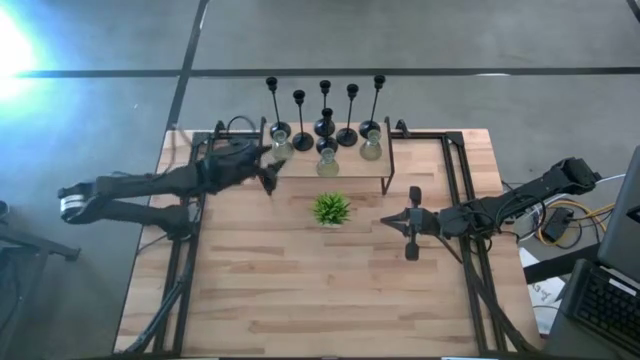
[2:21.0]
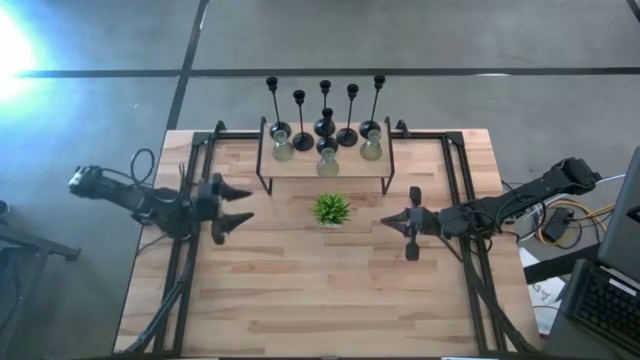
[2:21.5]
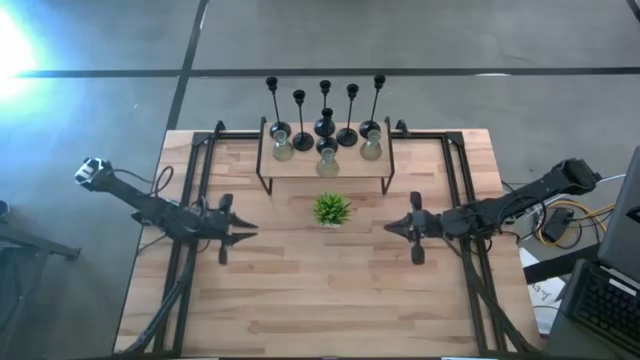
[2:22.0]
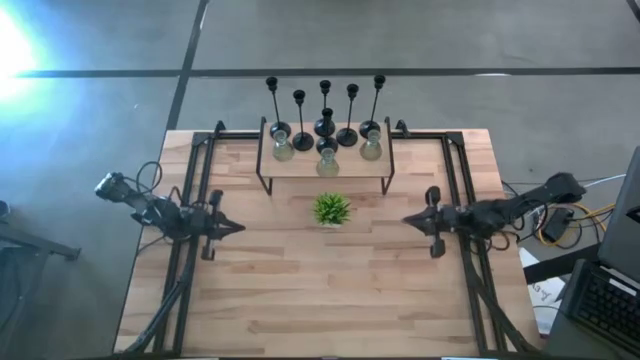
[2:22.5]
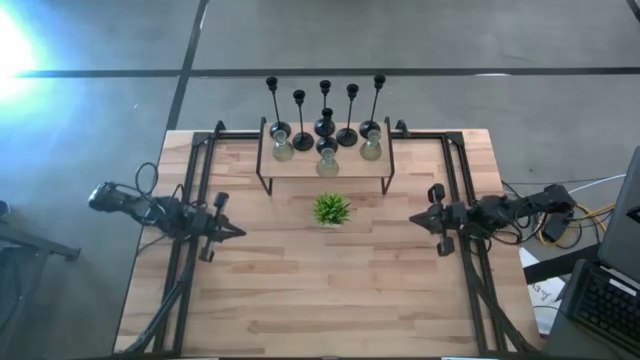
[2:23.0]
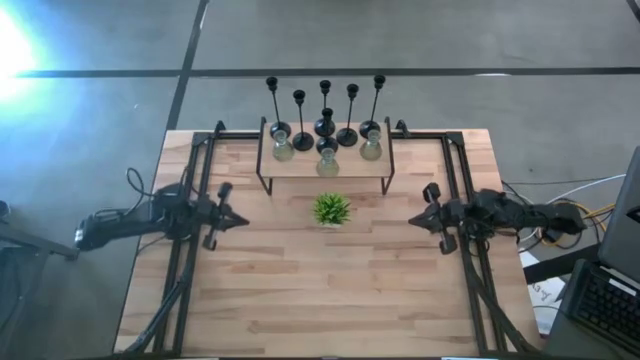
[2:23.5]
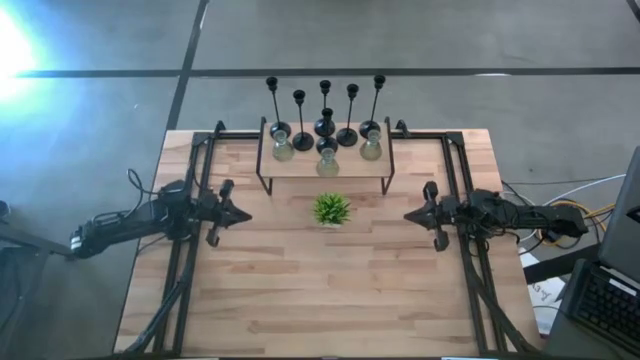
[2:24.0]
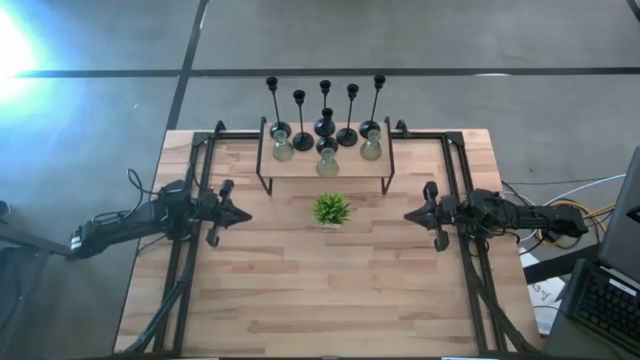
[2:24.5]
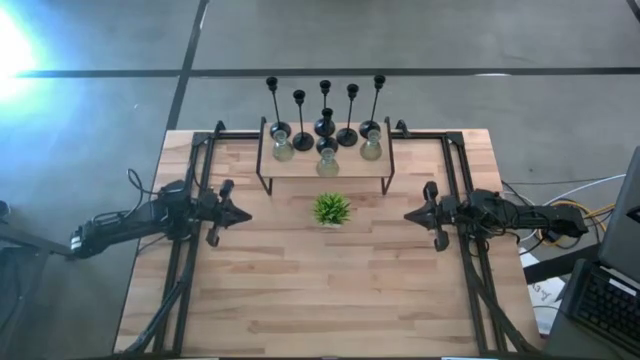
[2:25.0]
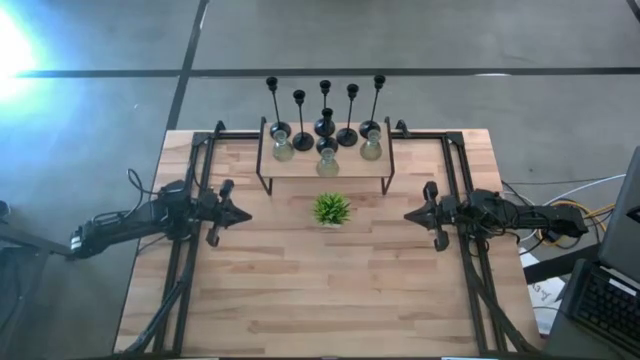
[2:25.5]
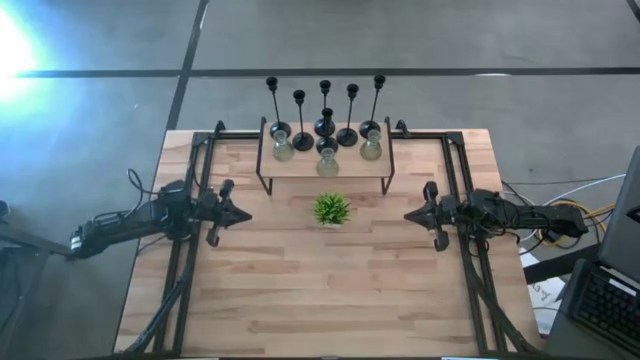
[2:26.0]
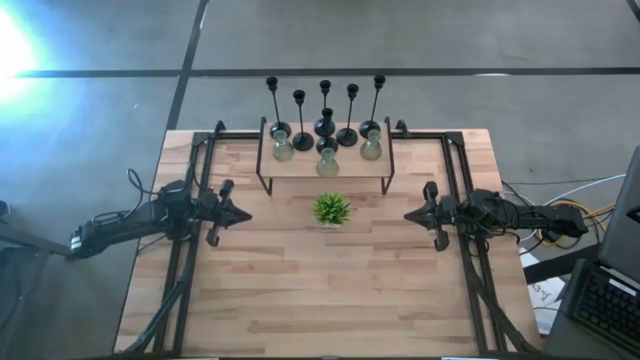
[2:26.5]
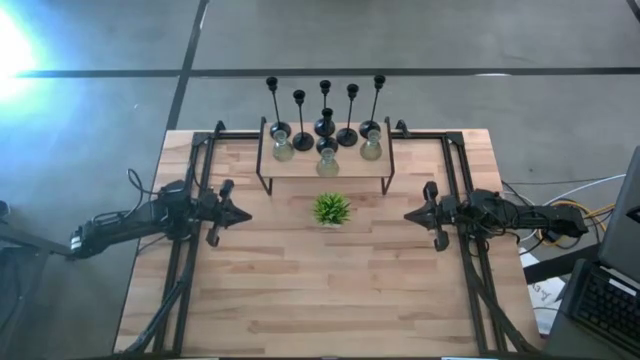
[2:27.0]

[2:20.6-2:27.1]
Task: Pick & Place candle stick holders
Return to Home Position

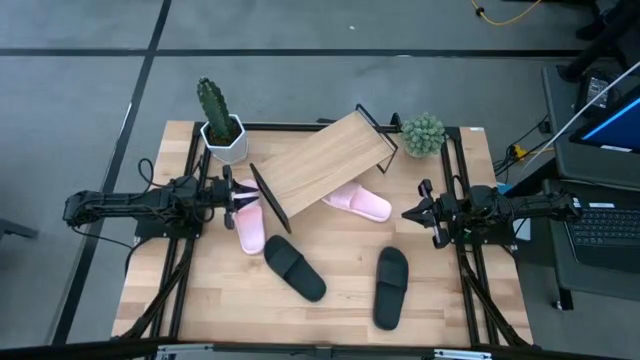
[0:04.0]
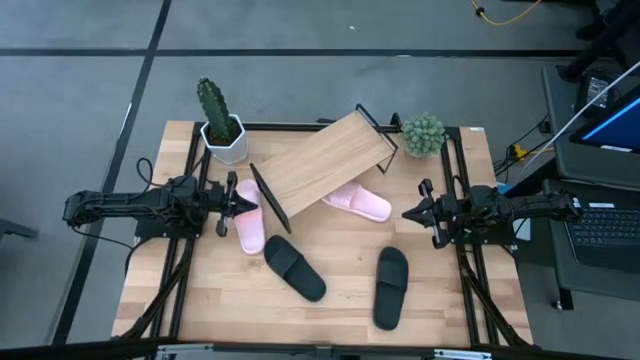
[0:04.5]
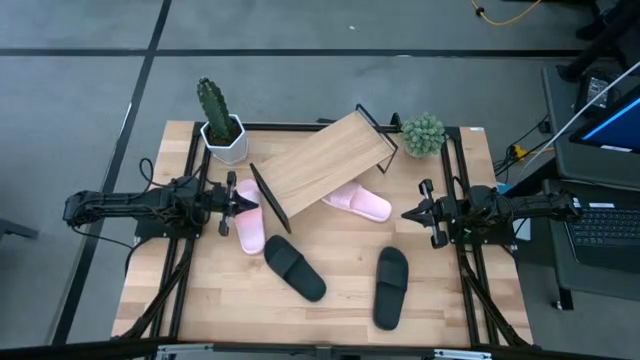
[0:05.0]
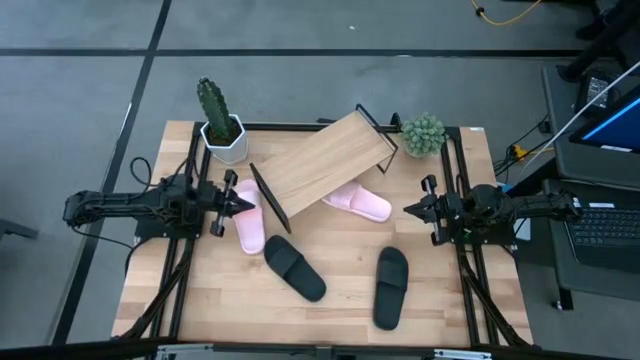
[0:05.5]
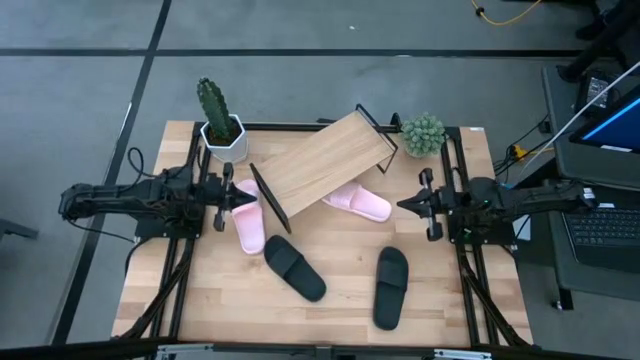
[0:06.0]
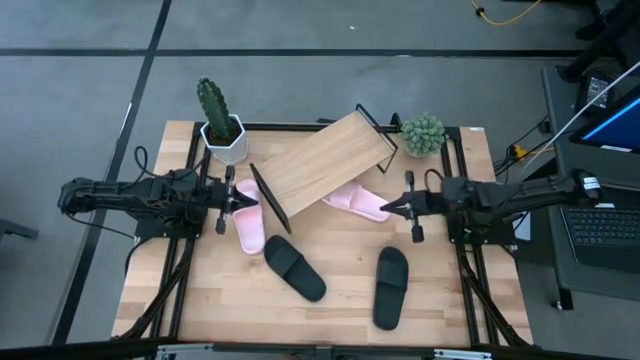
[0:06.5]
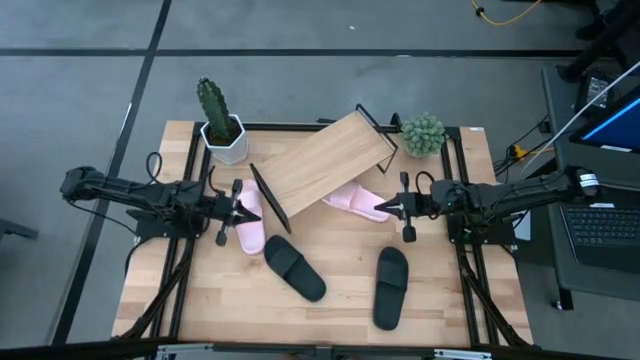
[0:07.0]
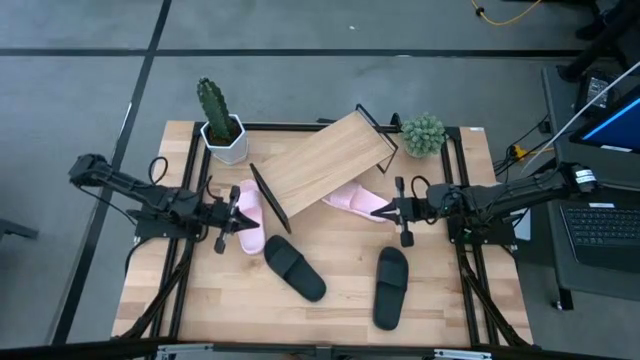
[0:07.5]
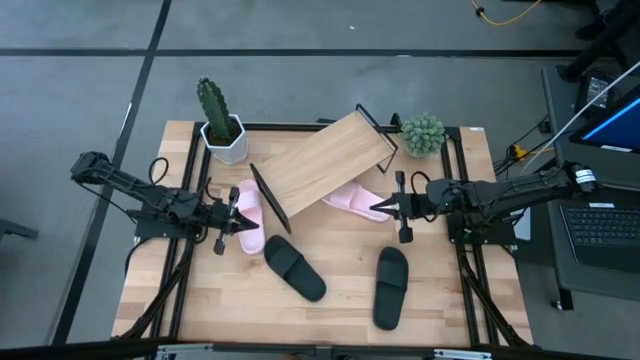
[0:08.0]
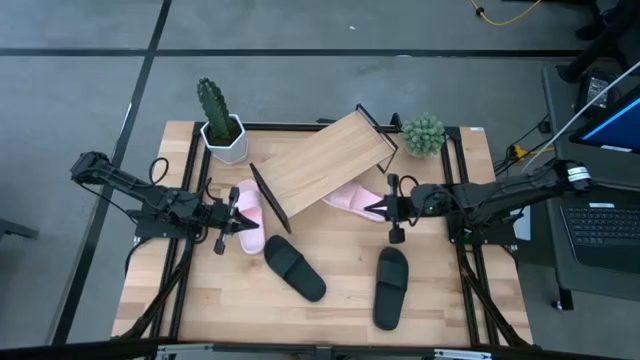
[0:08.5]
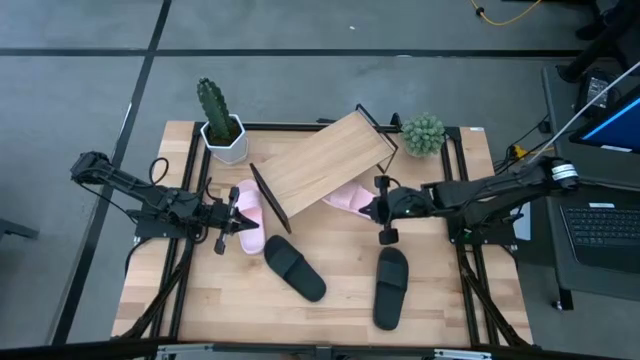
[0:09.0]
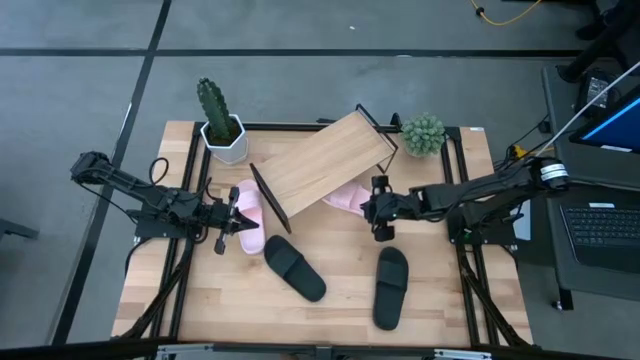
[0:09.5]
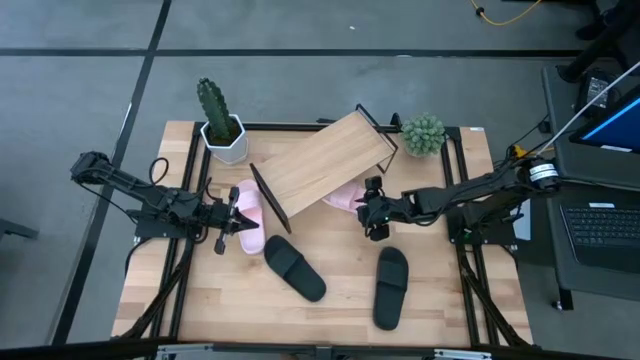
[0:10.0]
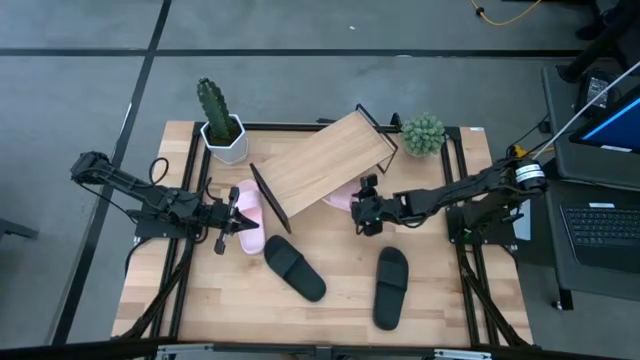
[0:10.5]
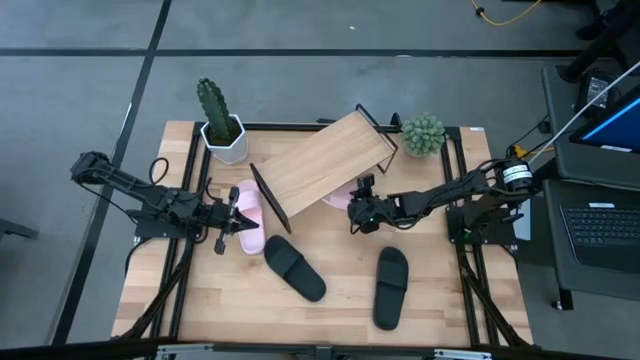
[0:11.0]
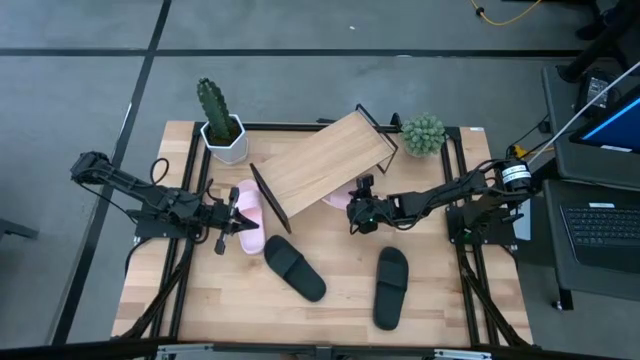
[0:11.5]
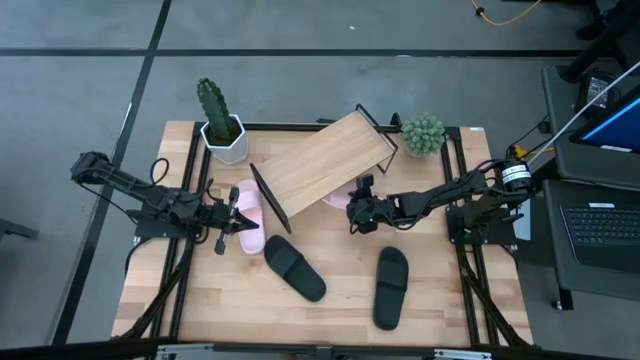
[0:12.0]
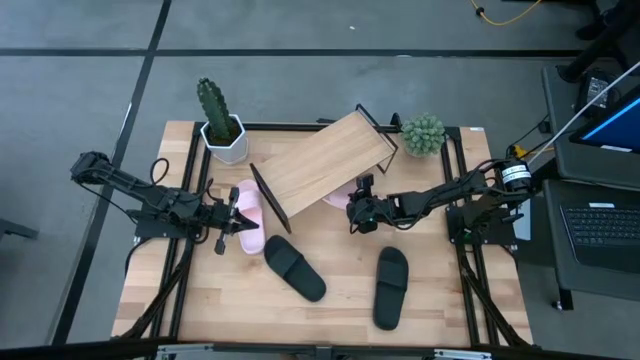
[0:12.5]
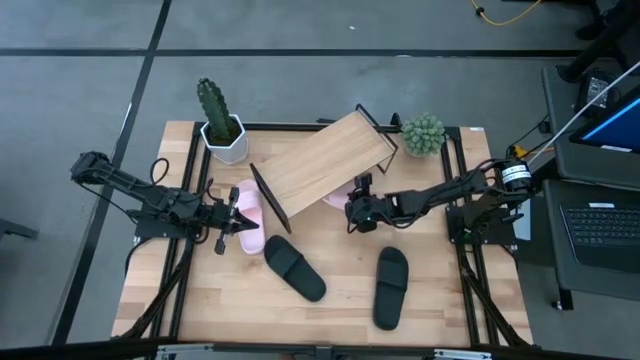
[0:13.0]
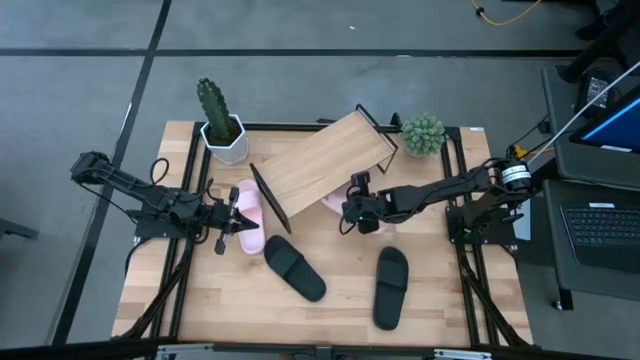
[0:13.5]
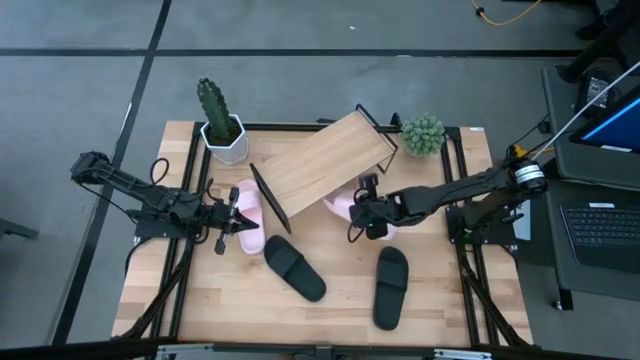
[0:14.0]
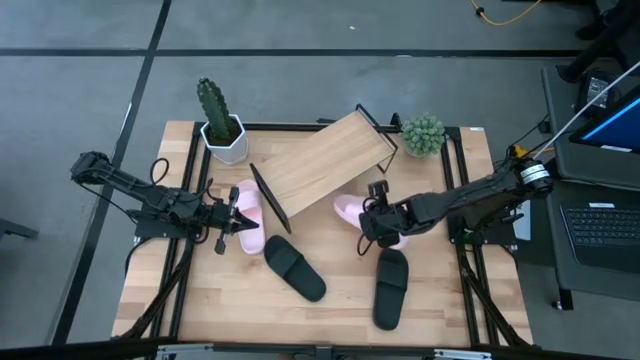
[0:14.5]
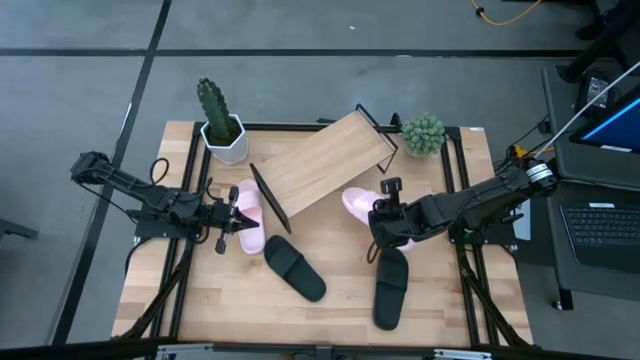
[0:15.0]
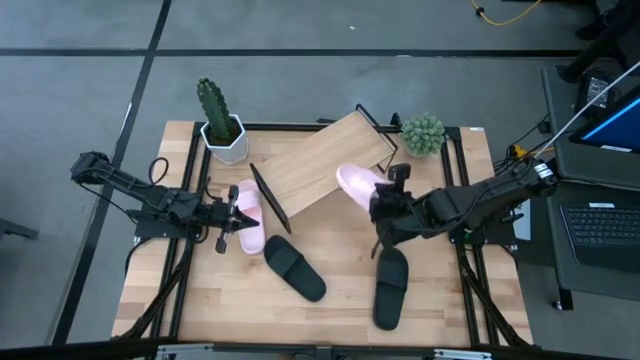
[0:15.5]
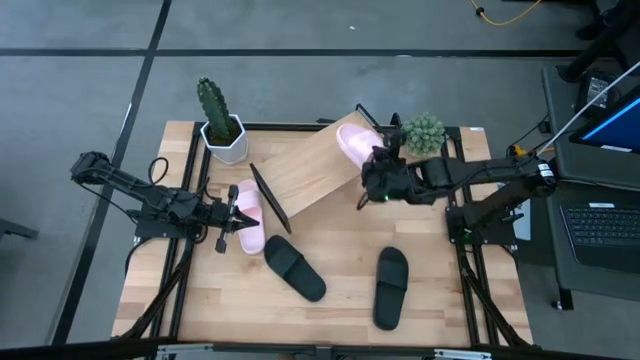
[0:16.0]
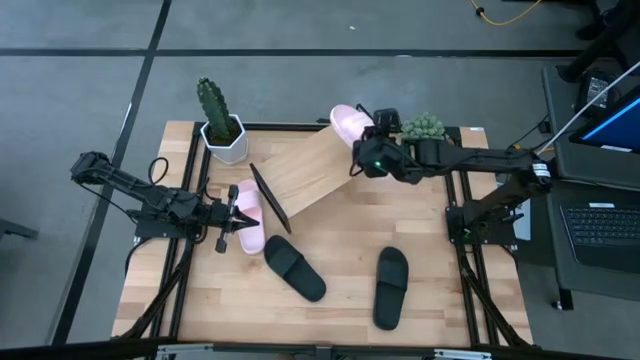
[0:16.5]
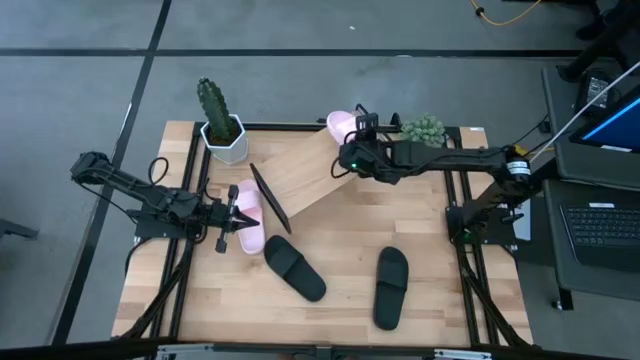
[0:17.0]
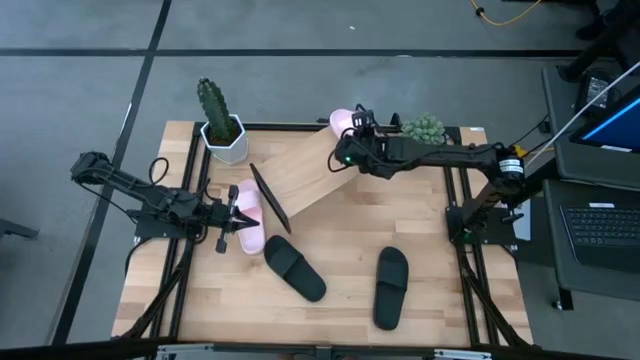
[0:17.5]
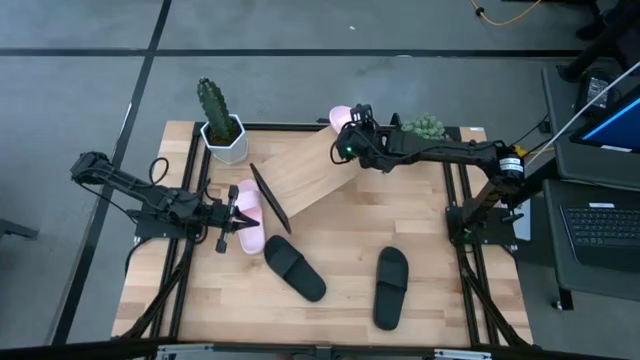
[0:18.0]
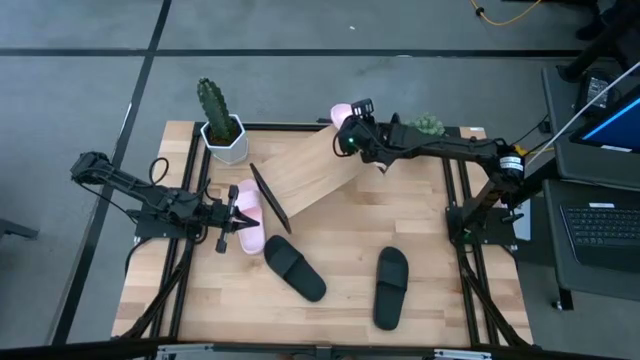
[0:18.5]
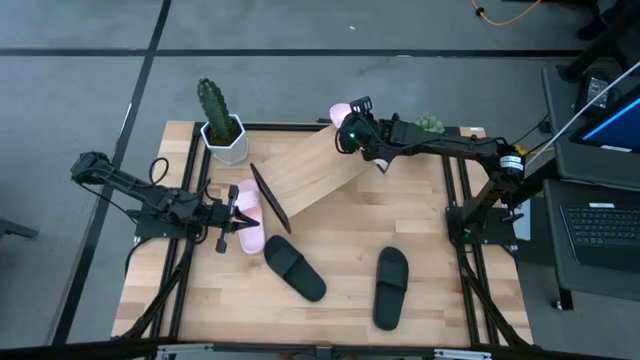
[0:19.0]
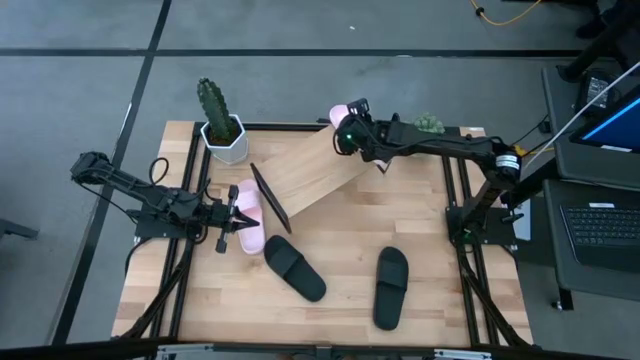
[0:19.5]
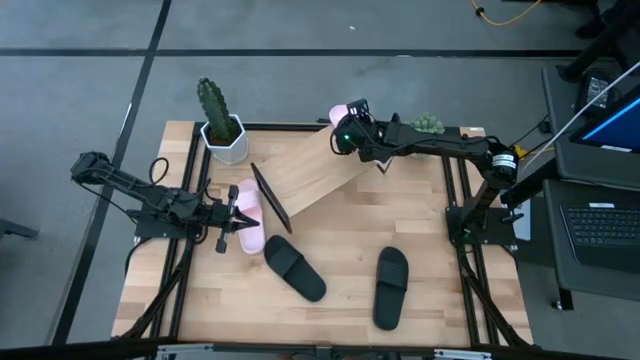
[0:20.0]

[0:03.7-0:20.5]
Task: Pick and place slides into the shelf
Put the right pink slides on the shelf
